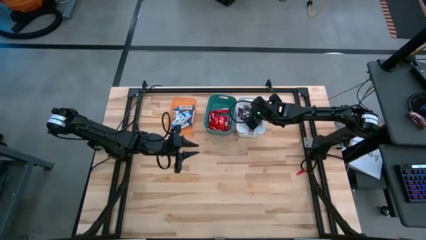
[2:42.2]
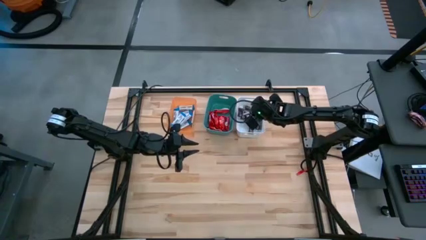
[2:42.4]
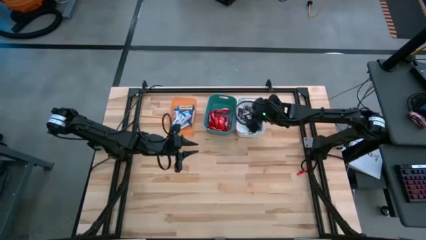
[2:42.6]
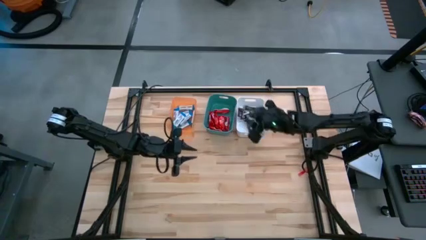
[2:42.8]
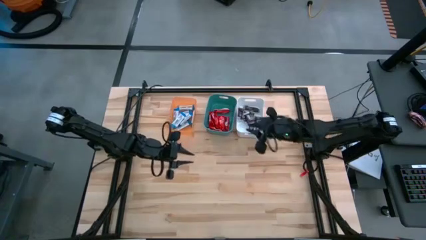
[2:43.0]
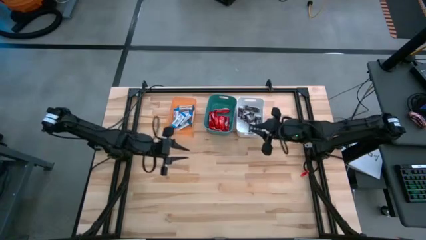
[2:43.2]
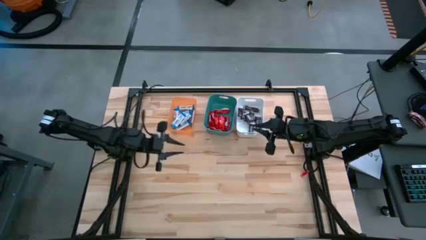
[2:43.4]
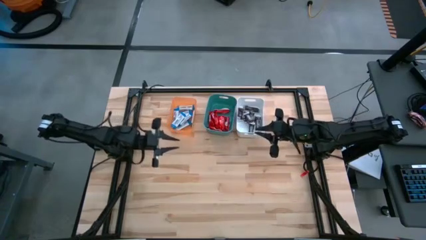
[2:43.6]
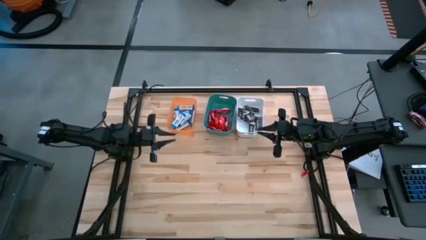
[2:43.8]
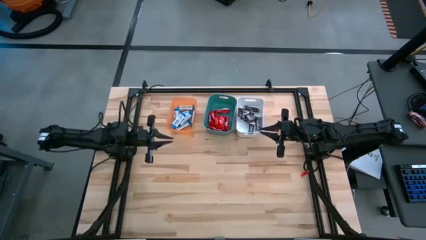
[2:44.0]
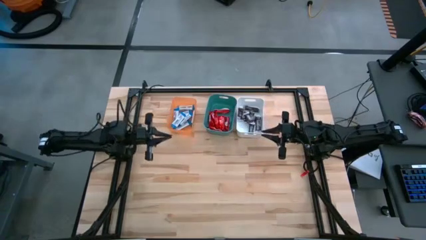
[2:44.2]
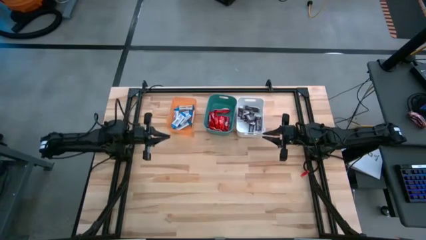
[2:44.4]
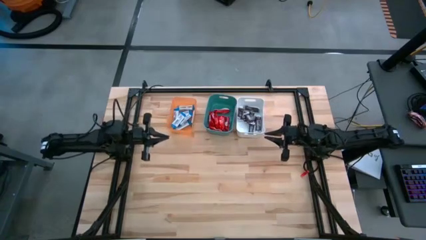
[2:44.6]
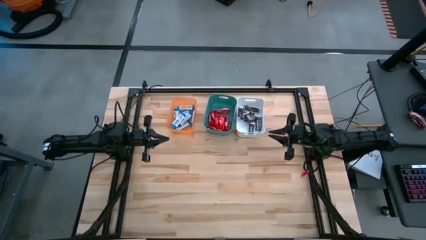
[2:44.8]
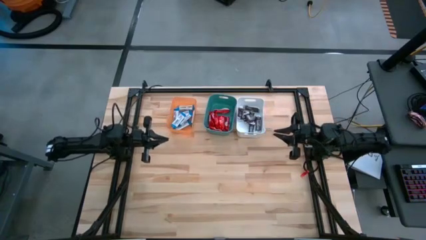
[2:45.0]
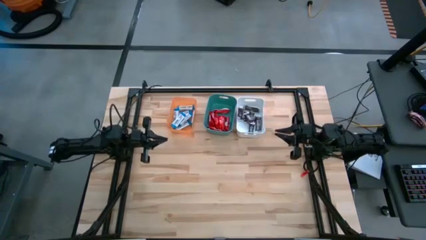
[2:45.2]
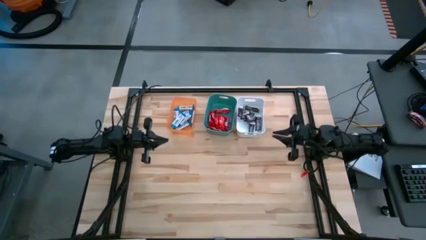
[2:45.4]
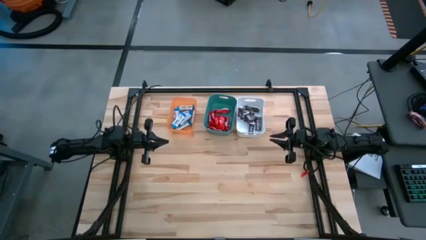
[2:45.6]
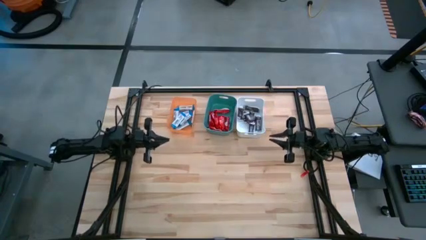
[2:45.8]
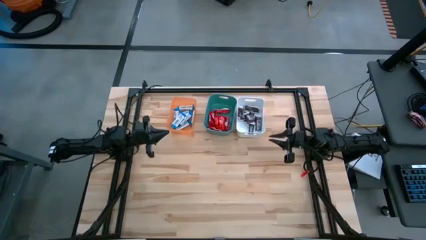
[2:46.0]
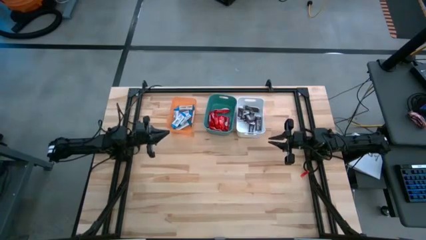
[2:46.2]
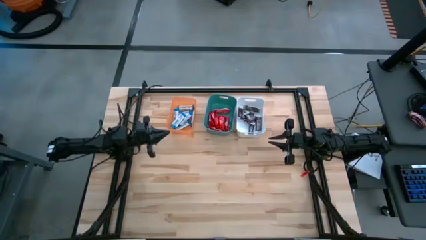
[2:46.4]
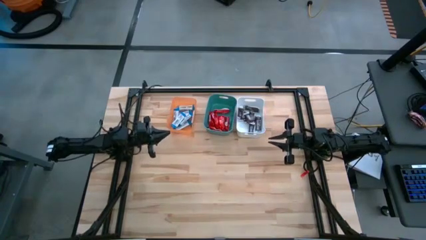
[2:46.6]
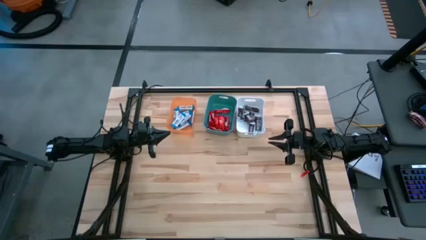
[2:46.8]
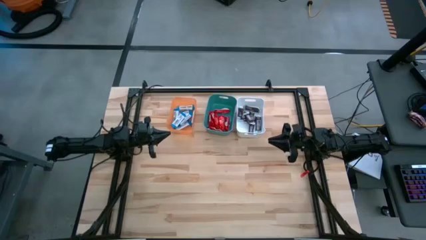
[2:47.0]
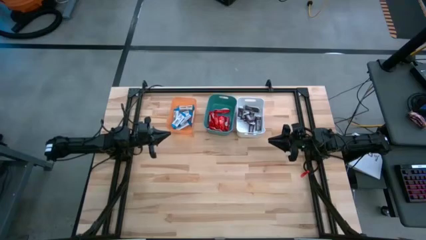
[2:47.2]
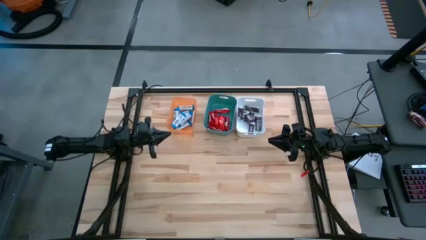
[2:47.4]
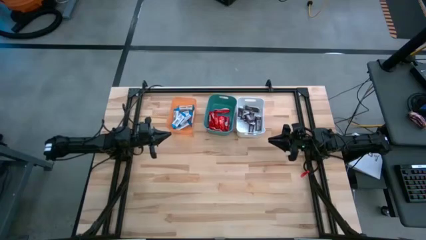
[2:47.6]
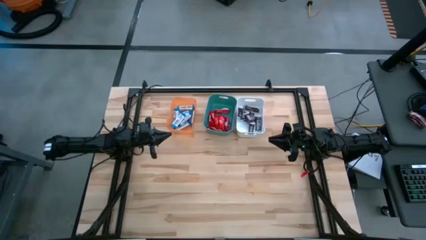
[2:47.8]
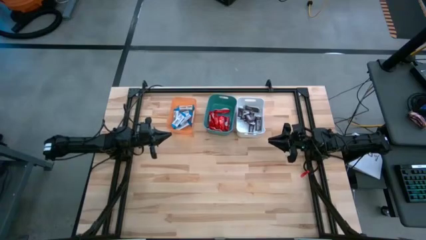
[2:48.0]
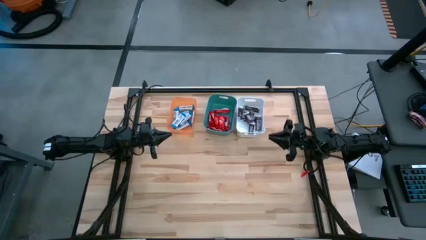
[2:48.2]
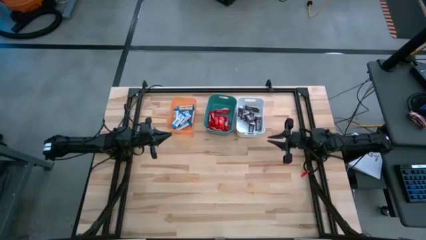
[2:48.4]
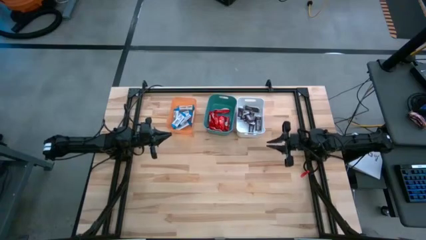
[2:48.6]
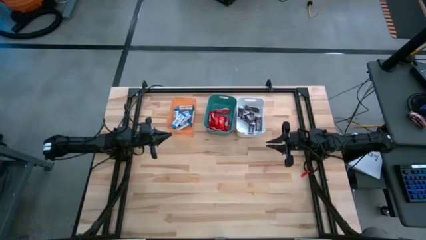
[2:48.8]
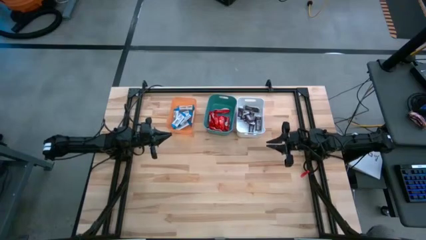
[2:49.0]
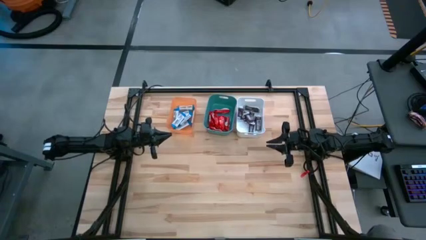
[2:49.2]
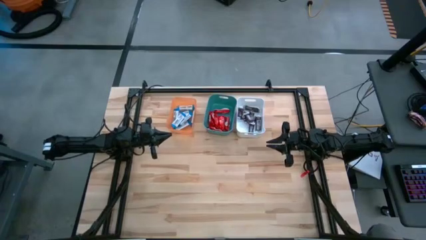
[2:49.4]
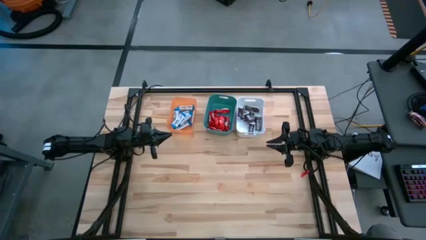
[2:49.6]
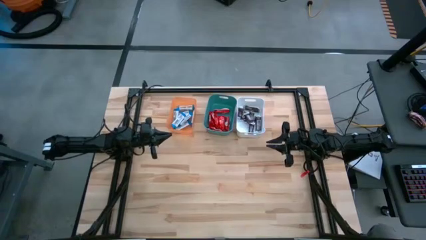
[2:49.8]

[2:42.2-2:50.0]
Task: Organize candy in baskets
Return to Home Position

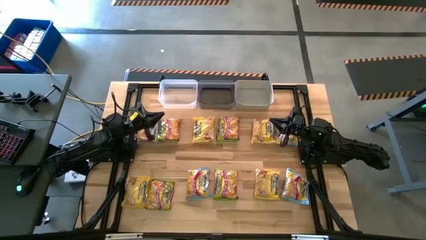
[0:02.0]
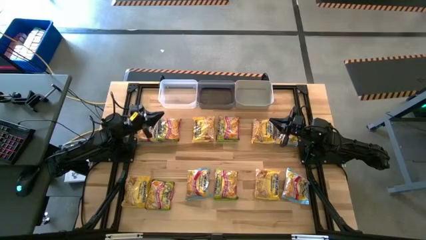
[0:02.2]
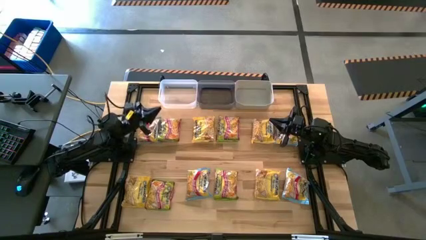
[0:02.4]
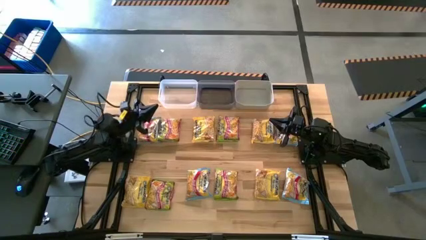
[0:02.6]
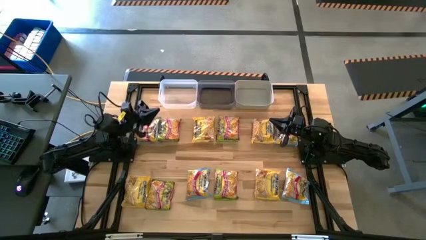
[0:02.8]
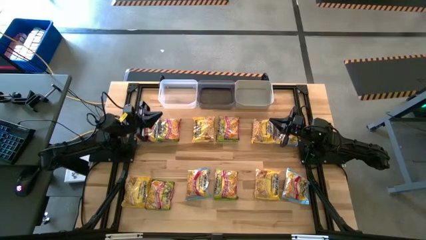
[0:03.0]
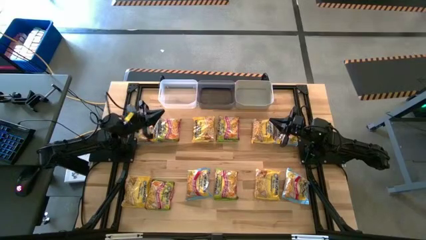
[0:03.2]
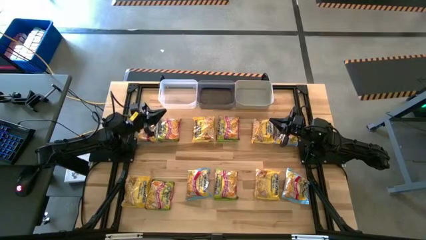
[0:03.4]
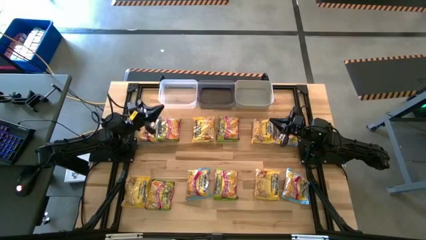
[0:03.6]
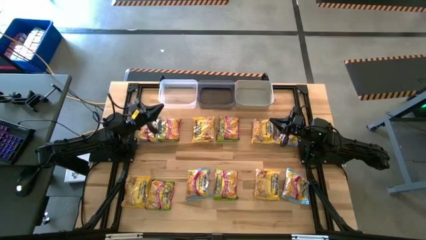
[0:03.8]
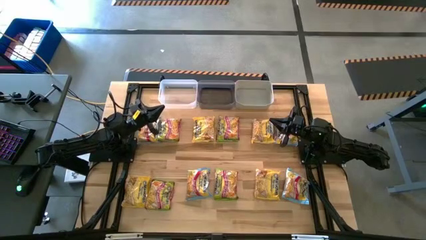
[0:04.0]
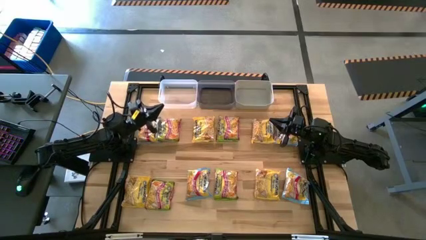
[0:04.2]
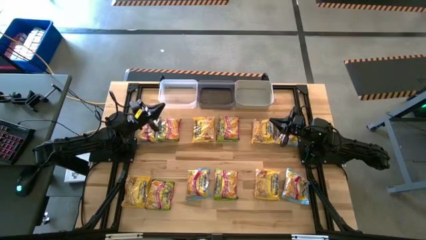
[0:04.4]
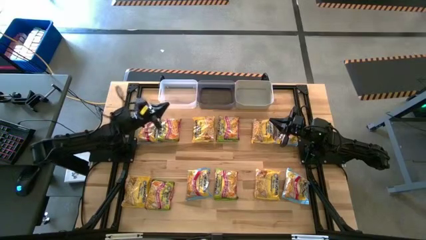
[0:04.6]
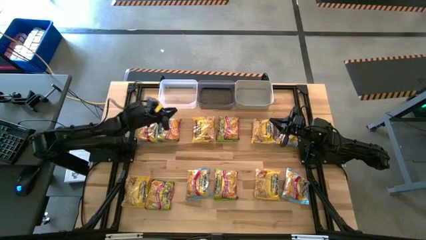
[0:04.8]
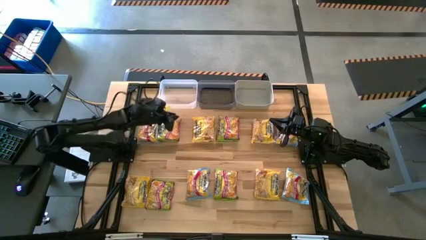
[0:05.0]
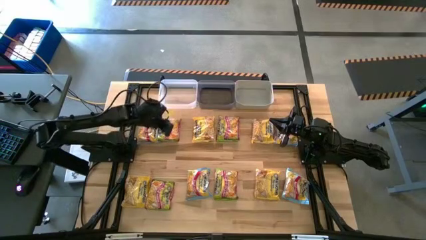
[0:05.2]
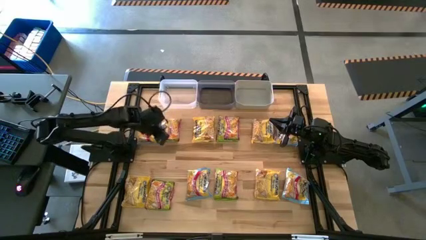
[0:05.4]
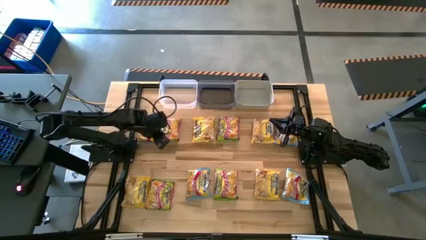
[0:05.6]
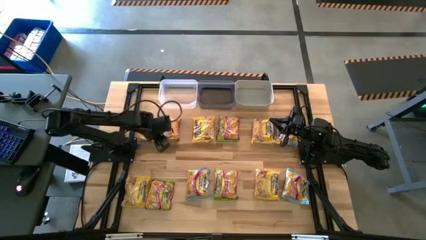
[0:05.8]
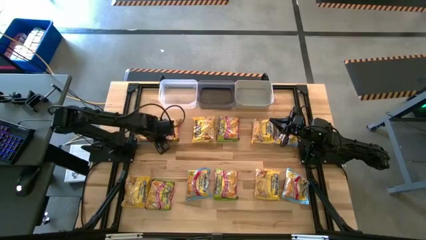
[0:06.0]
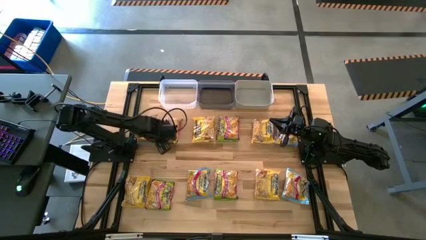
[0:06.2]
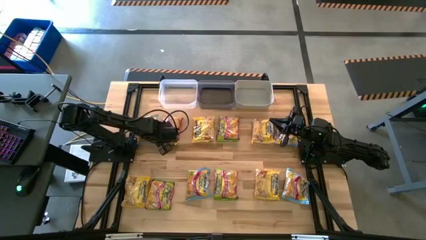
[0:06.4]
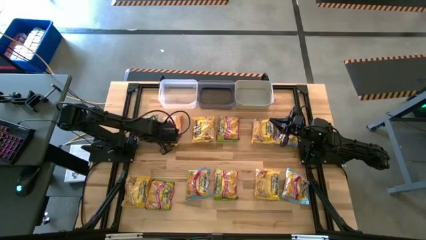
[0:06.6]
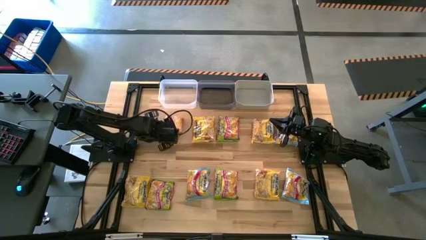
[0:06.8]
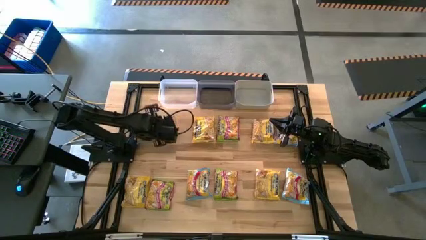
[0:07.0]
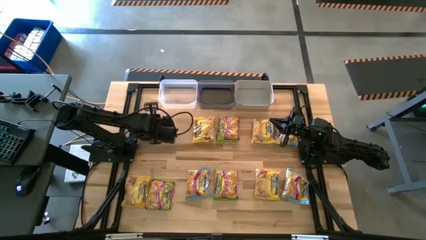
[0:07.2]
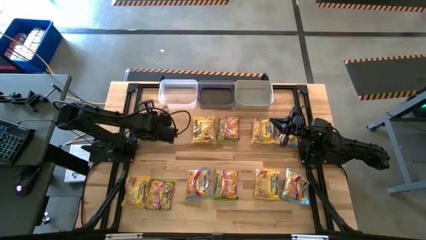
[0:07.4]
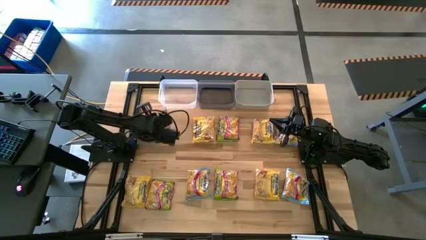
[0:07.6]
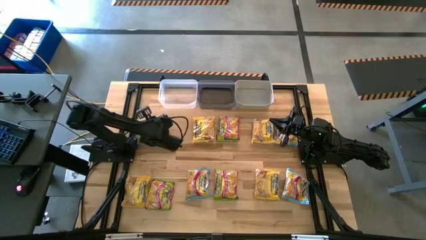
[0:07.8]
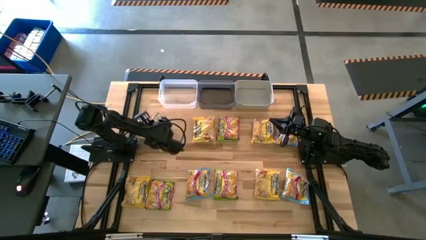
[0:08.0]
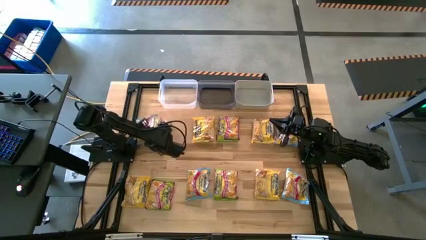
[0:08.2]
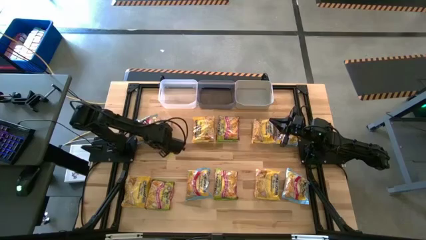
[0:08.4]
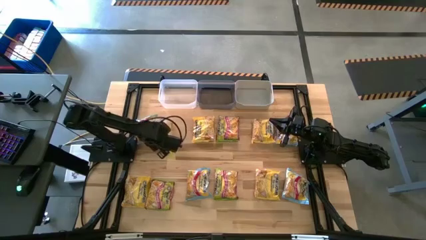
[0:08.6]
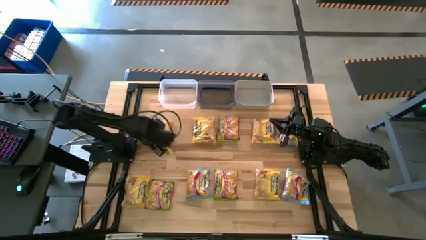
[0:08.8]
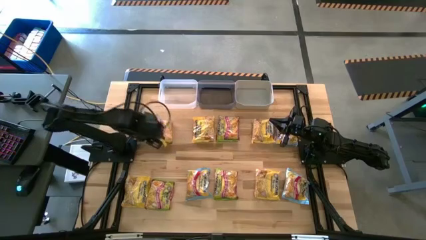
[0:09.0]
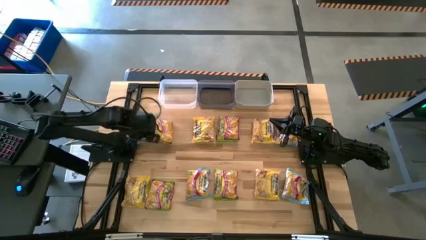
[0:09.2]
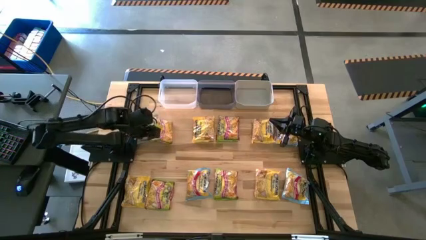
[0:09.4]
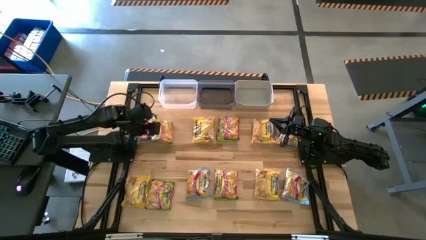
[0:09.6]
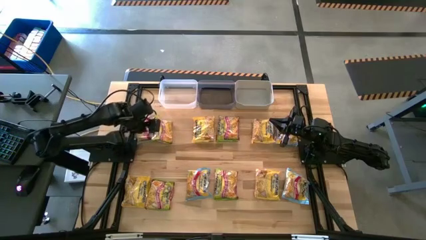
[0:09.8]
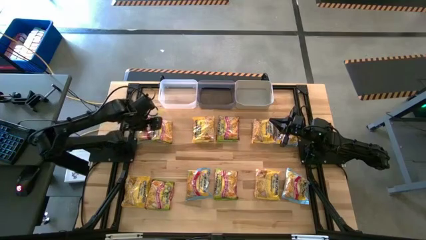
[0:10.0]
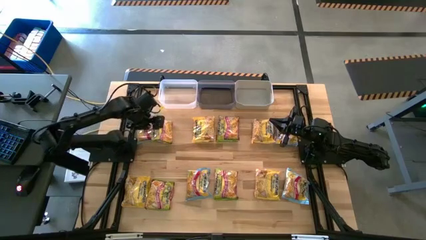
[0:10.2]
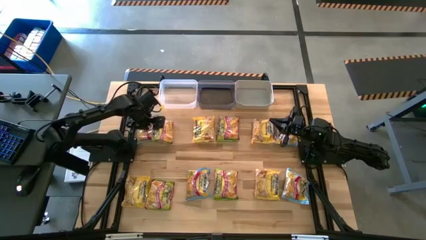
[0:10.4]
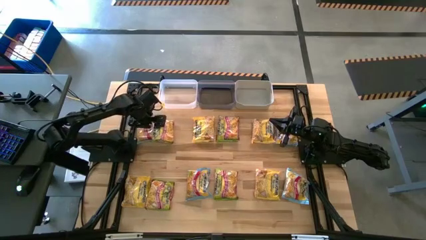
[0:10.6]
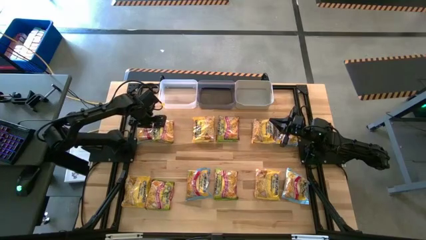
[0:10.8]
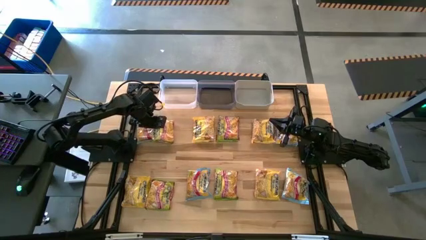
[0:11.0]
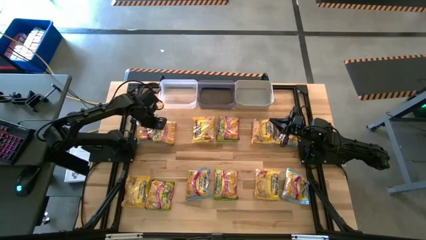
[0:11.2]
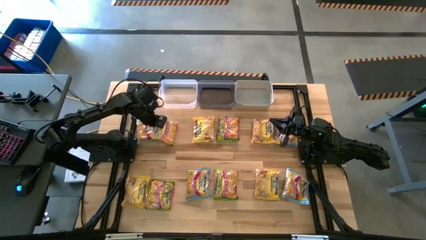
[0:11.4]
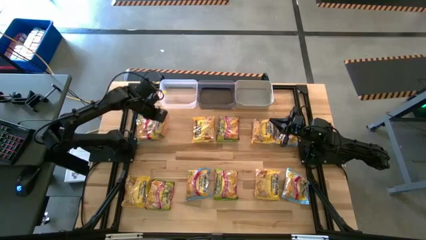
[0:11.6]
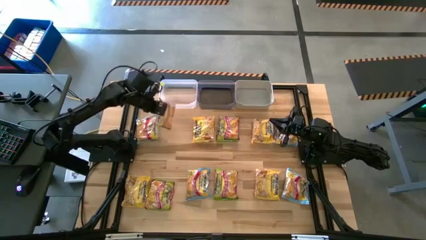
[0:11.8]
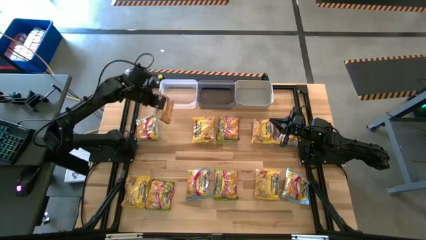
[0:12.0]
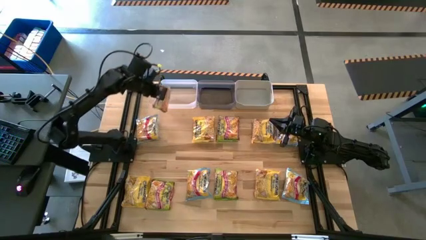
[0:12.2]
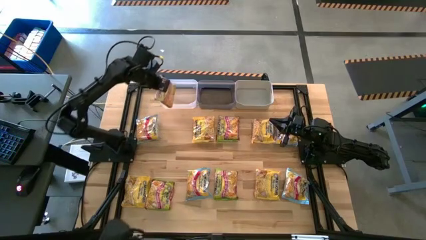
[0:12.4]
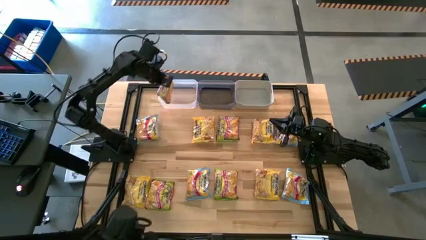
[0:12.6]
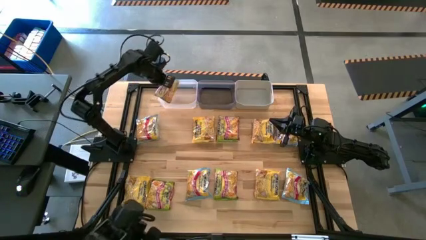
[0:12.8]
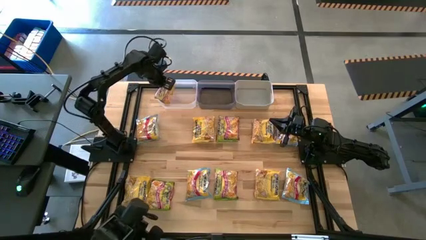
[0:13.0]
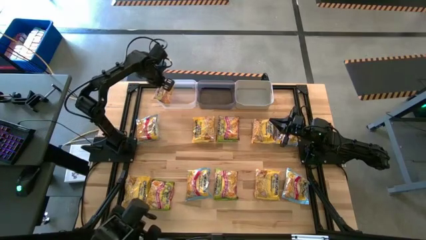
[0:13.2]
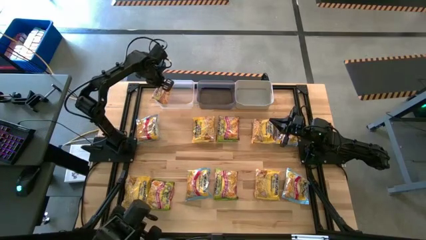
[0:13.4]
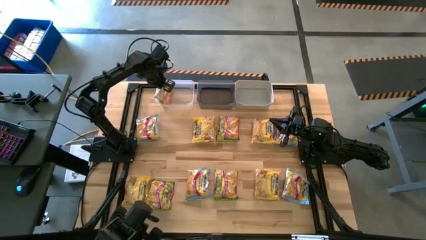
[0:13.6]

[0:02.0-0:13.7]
Task: Sort Maruchan noodles
Put the top left green noodle pack into the transparent bin
